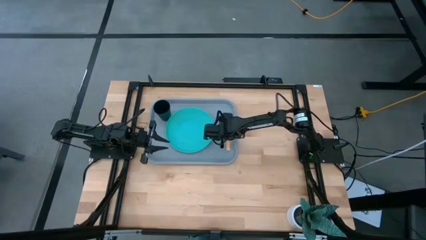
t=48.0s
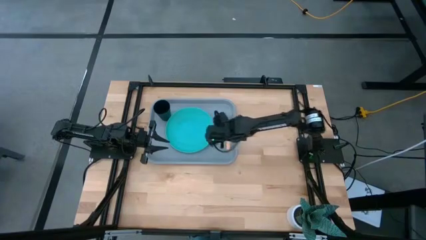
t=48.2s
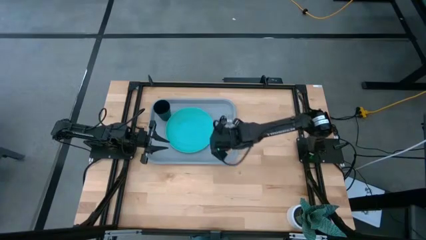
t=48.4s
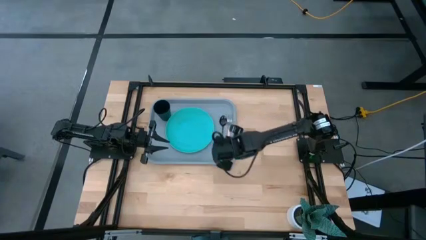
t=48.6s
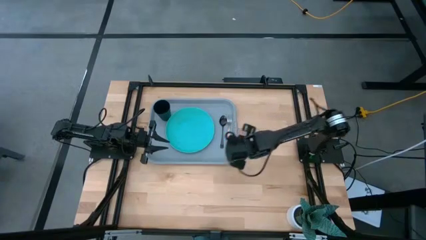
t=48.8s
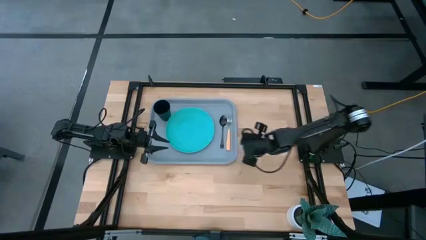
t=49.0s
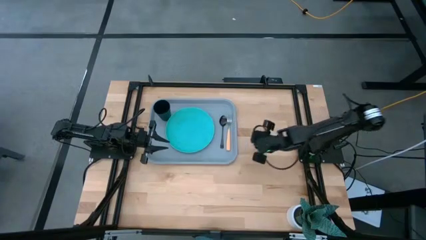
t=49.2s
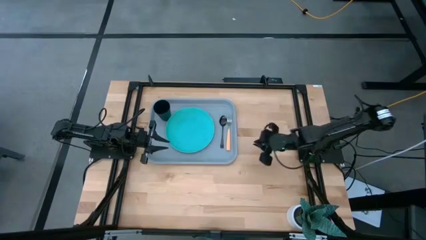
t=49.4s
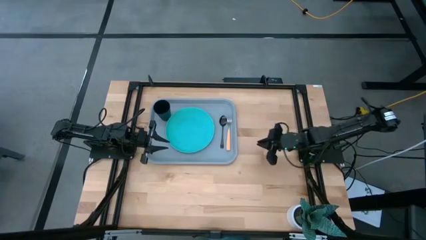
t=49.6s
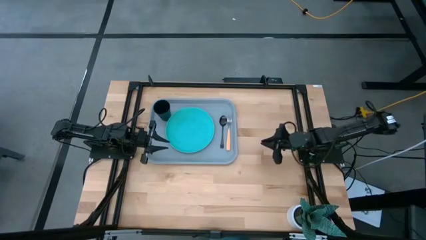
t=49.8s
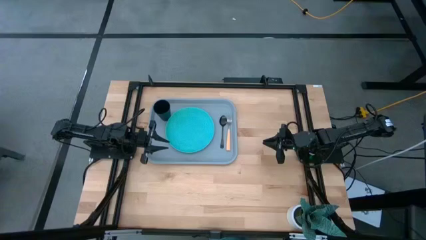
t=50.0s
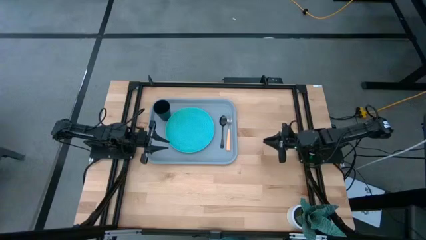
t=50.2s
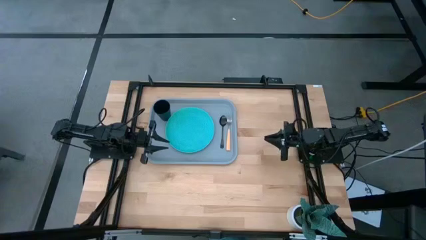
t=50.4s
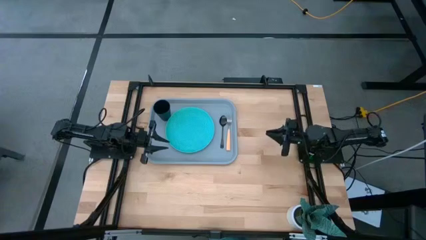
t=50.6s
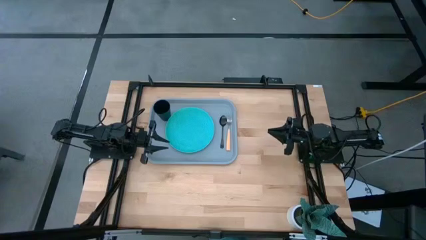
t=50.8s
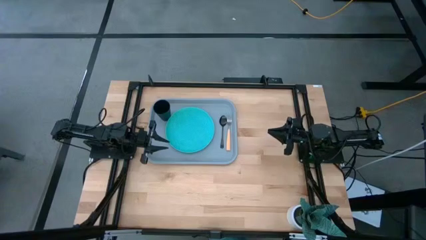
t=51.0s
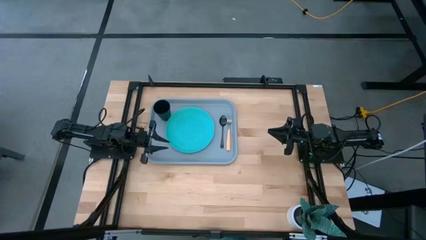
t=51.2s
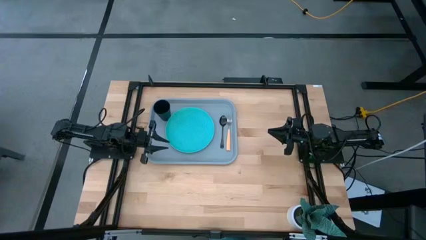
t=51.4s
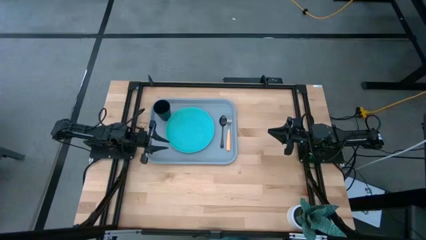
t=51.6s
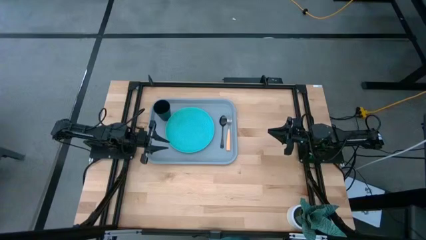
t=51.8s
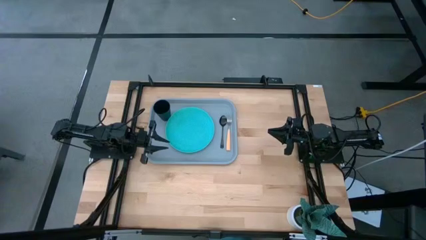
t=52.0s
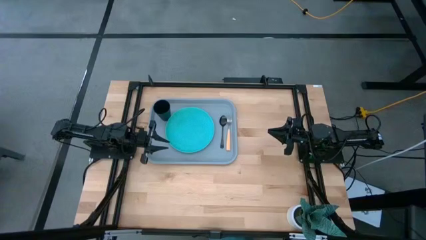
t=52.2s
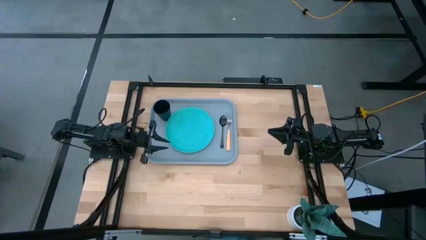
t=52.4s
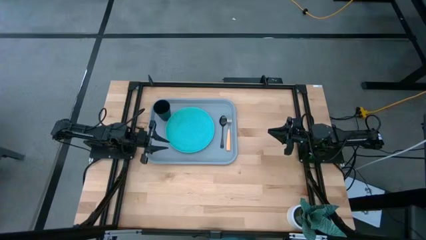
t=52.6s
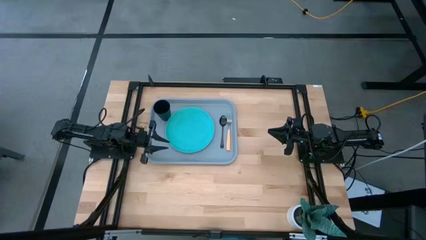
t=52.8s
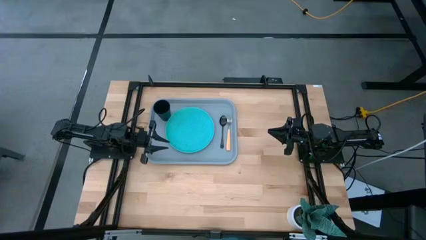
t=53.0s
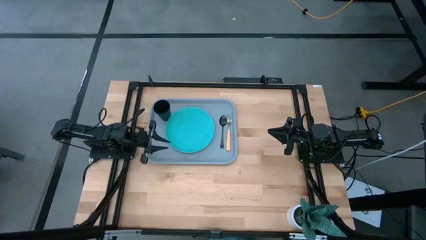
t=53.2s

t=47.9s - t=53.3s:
Task: Pick and place plate/cup/fork/spoon on tray
Return to Home Position

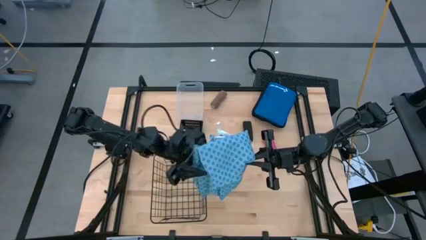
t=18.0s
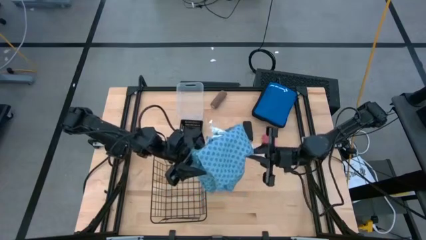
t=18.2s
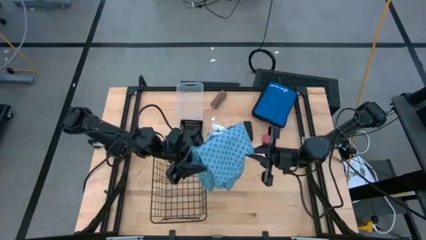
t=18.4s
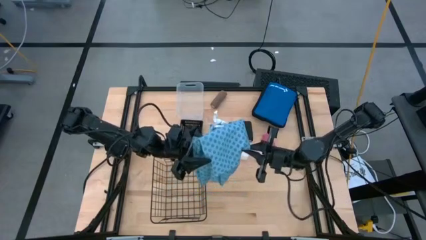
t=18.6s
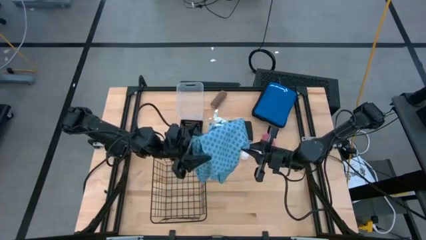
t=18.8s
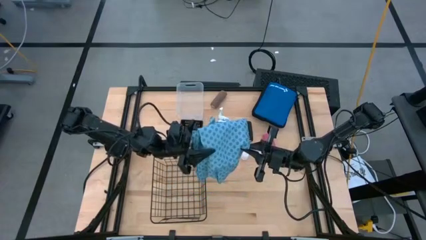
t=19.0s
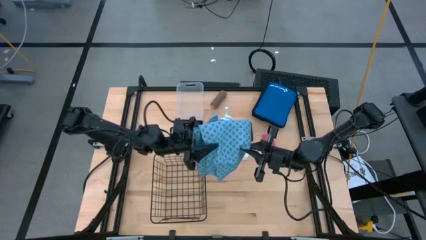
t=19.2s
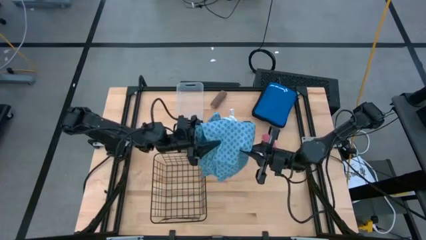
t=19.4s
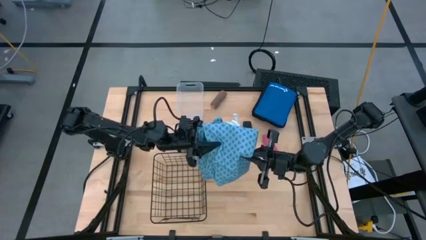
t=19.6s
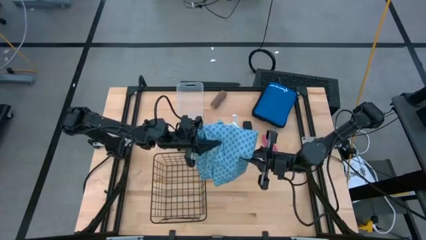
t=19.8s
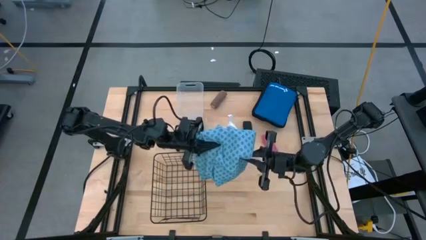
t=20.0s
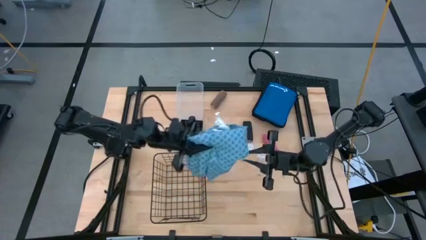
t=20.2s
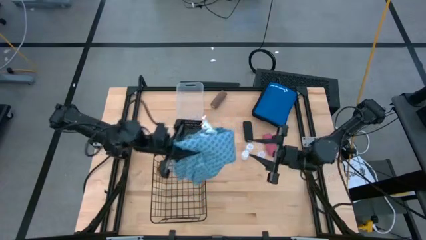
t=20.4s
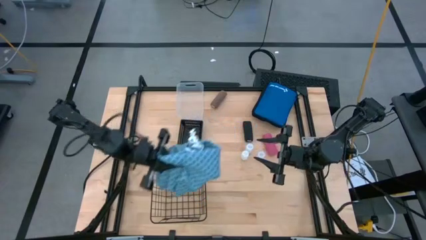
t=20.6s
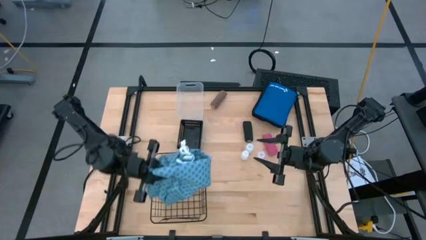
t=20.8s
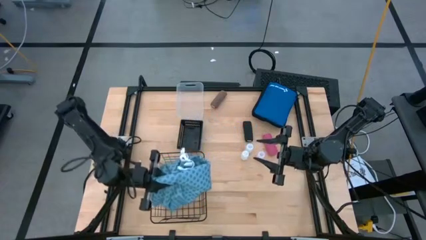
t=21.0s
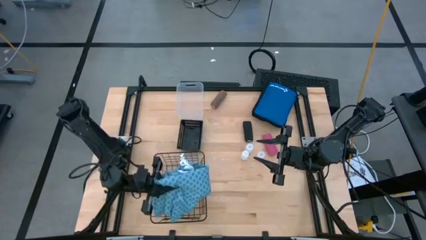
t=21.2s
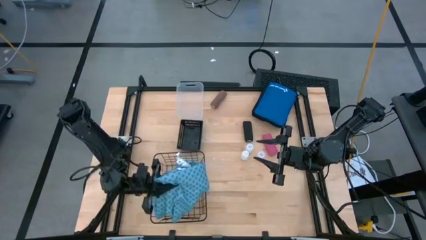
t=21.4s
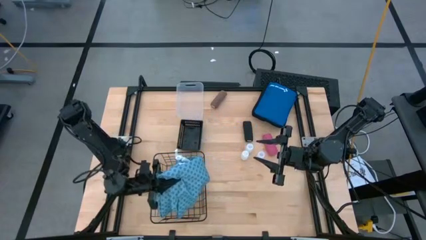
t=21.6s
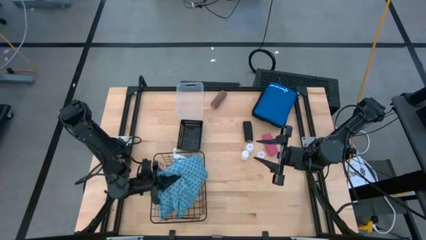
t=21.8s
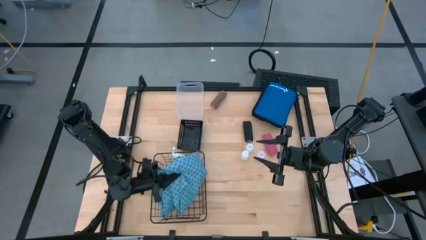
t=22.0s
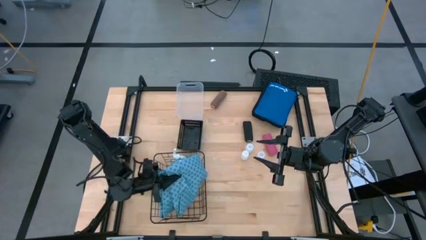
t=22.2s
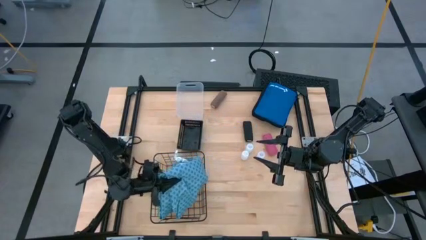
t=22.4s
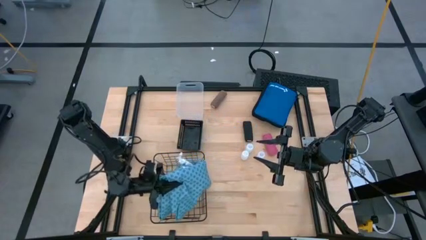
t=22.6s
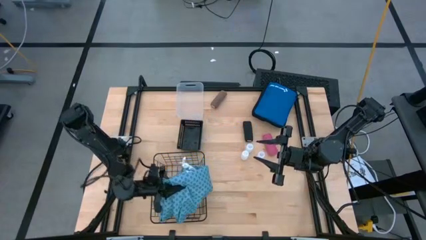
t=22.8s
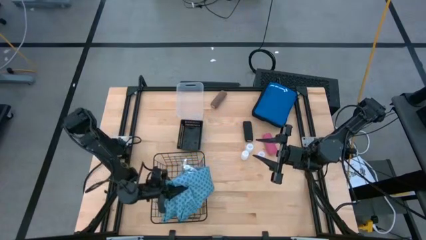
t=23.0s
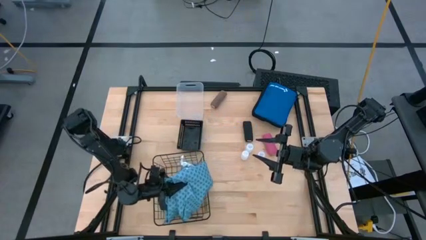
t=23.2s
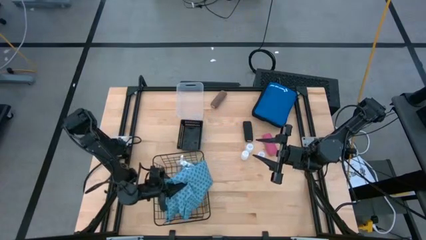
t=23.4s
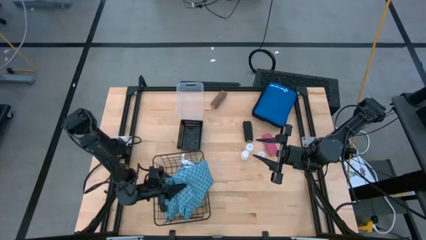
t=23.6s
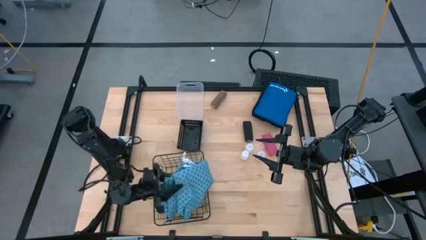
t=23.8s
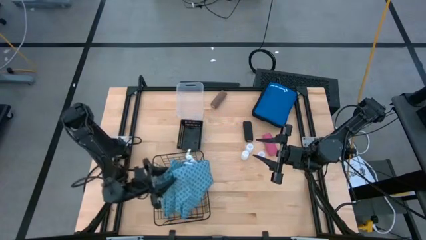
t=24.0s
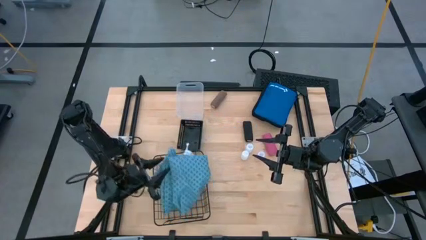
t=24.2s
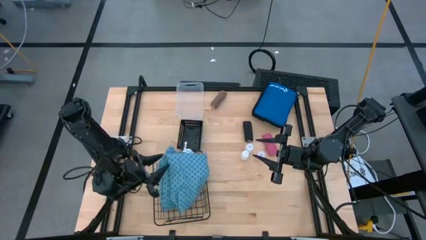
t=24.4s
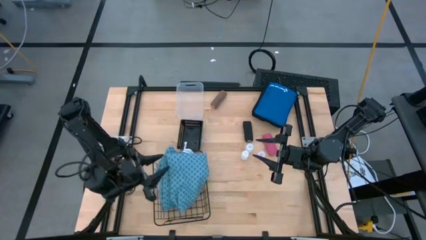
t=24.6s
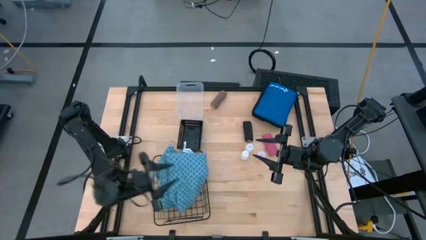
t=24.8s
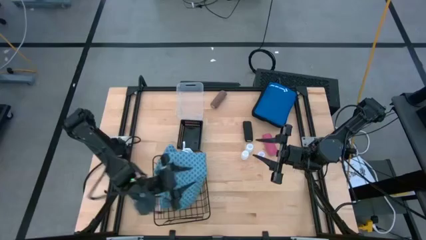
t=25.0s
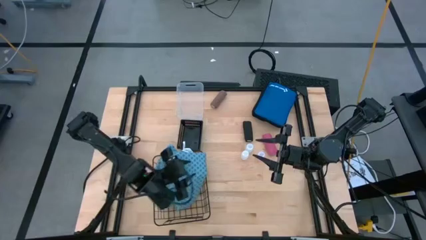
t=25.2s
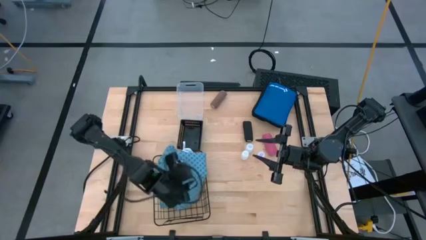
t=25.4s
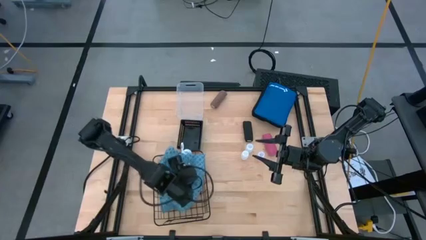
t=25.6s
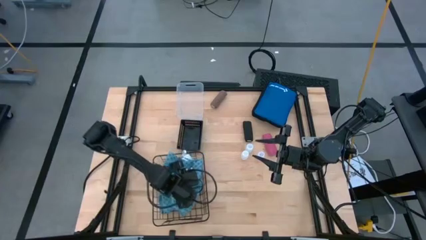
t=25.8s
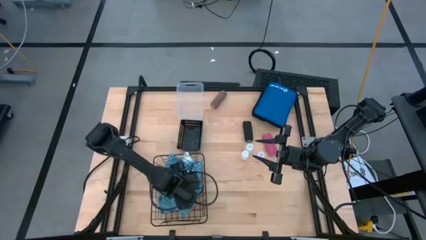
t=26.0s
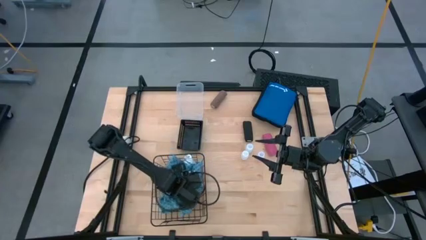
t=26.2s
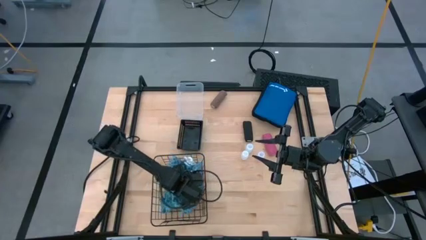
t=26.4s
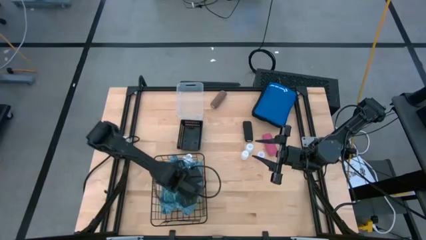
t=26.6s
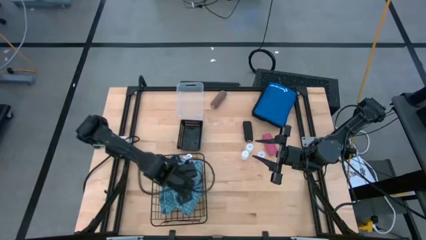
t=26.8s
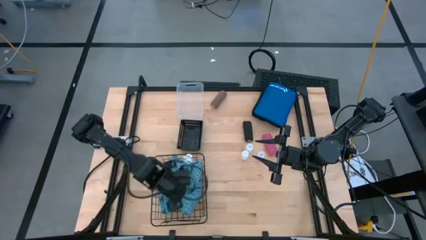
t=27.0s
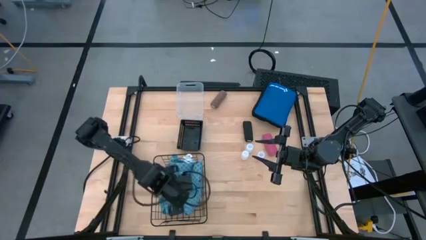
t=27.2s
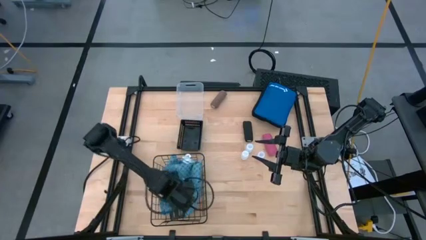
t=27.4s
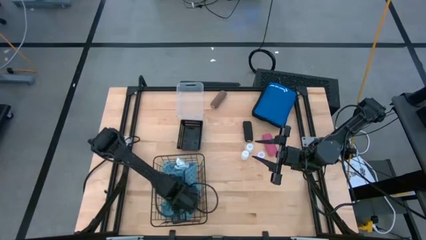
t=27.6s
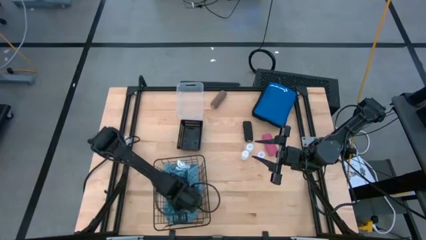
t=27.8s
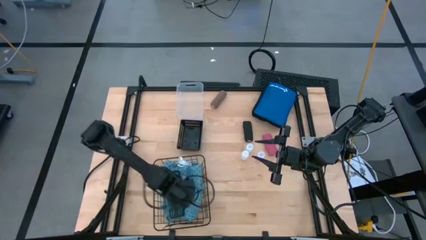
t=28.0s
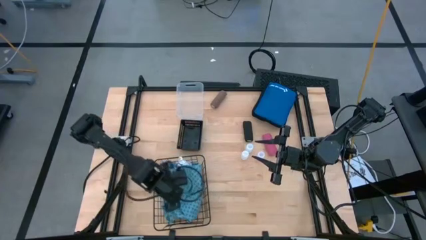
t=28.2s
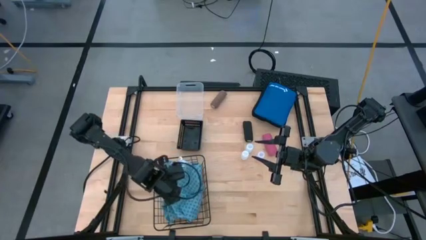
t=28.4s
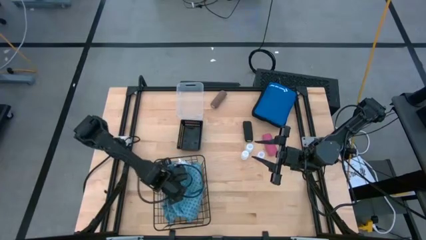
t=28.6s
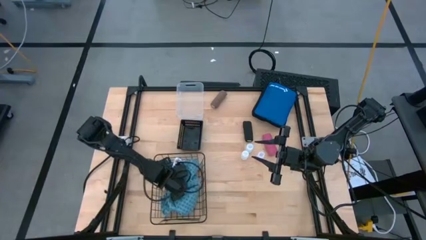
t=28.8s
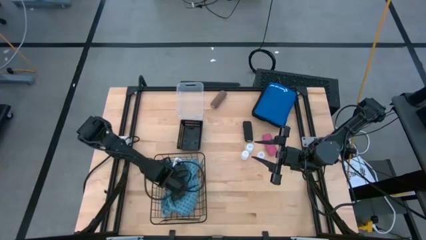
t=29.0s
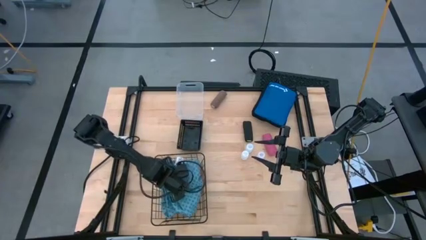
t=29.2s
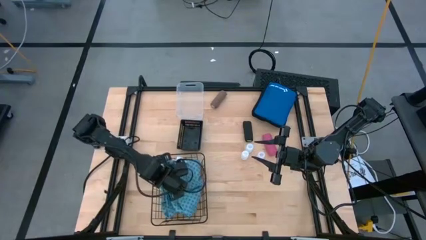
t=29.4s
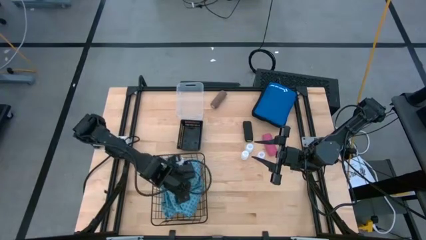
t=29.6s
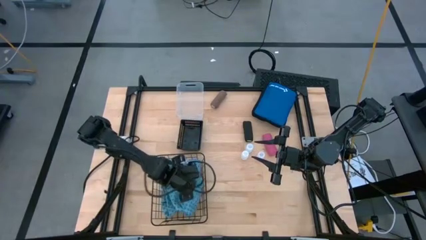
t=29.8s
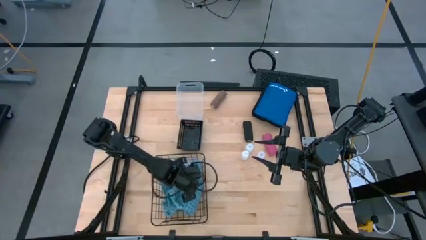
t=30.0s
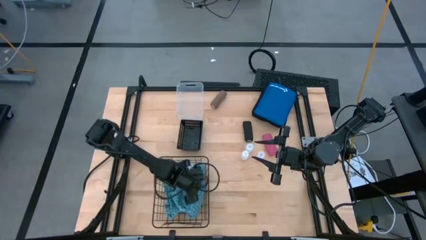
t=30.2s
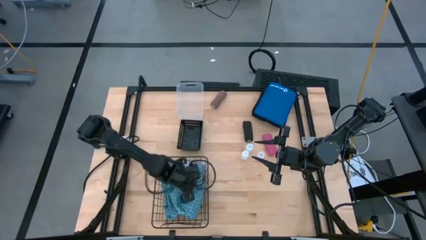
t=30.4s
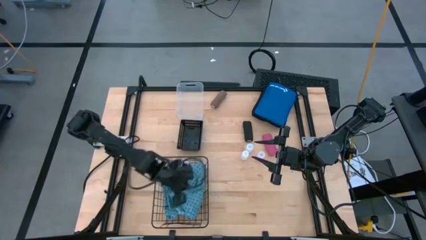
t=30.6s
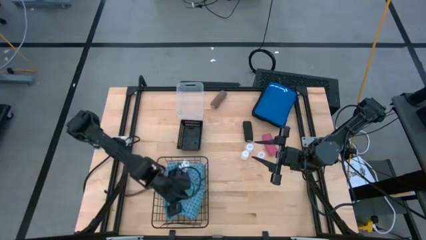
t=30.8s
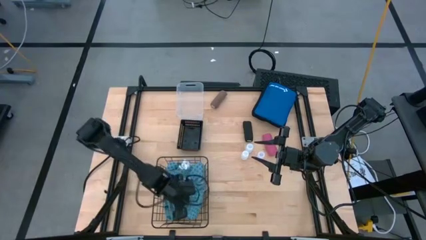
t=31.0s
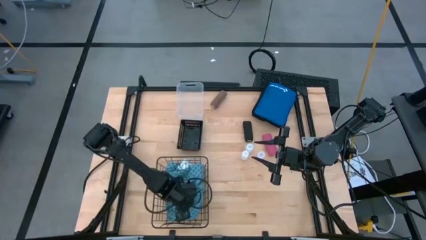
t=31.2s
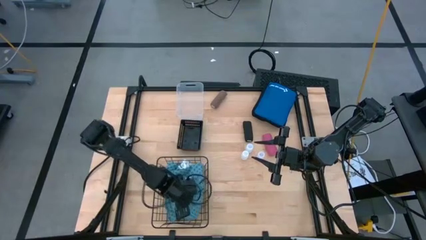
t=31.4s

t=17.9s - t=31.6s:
Task: Pick & place medical supplies in basket/bin
Put the blue patient gown into the black wire basket
